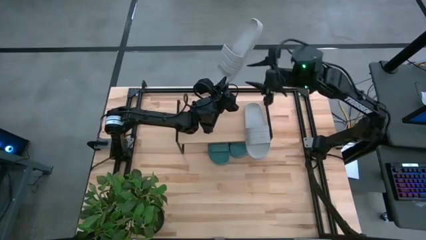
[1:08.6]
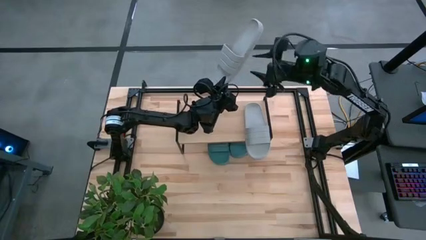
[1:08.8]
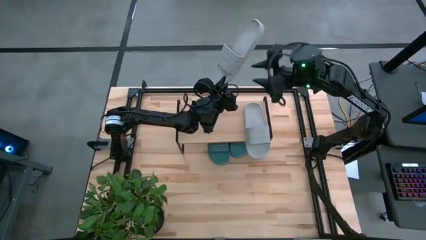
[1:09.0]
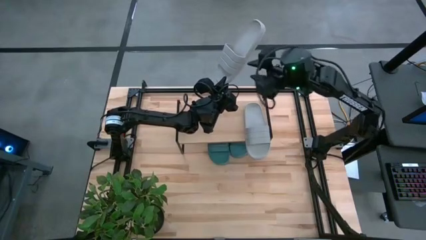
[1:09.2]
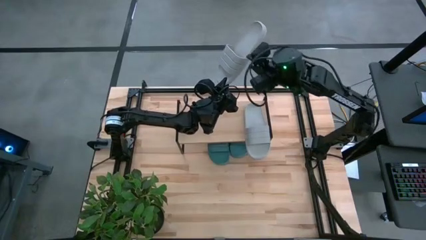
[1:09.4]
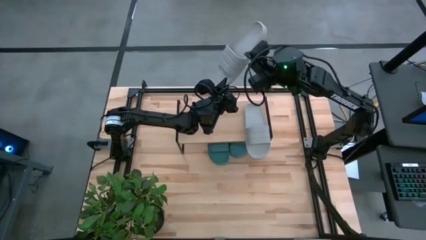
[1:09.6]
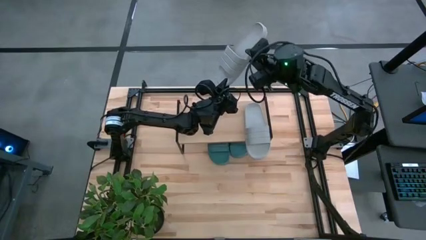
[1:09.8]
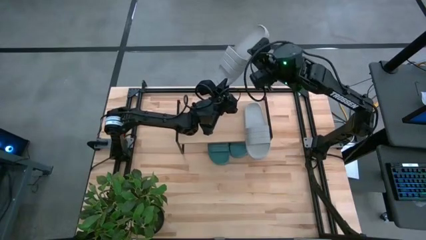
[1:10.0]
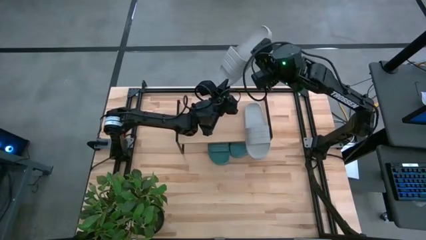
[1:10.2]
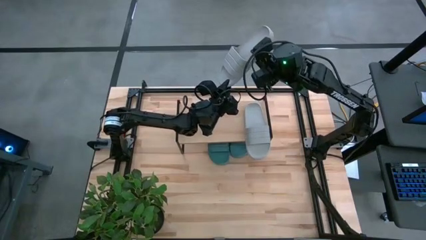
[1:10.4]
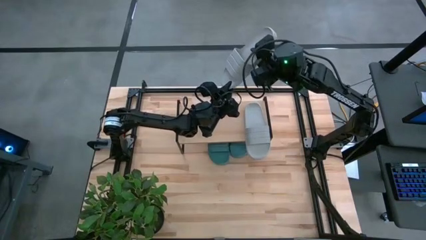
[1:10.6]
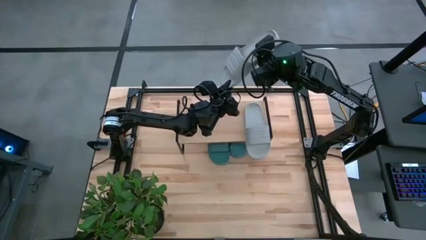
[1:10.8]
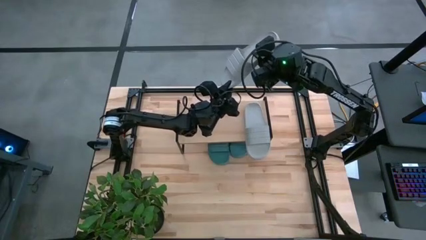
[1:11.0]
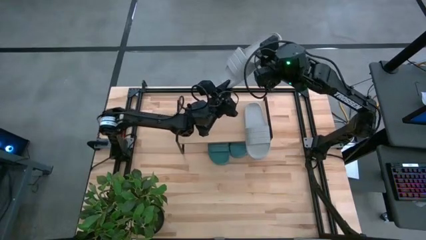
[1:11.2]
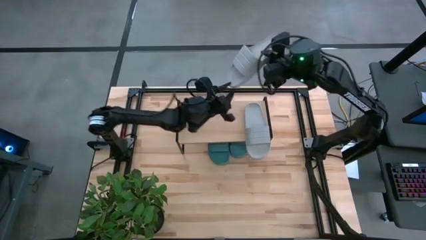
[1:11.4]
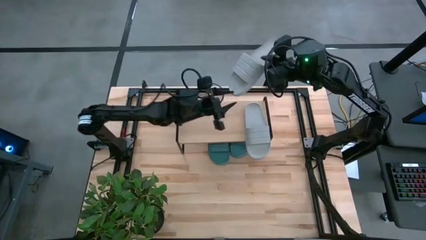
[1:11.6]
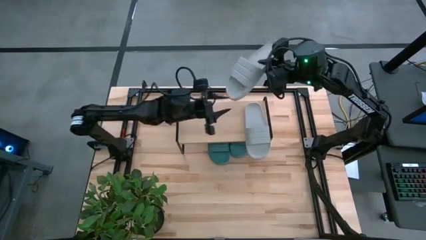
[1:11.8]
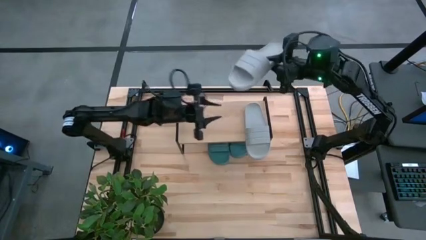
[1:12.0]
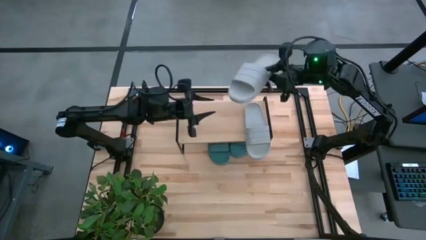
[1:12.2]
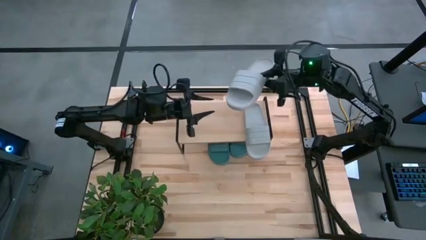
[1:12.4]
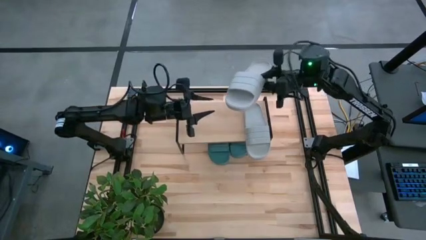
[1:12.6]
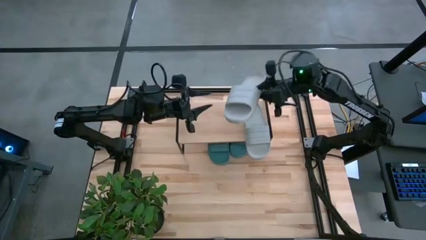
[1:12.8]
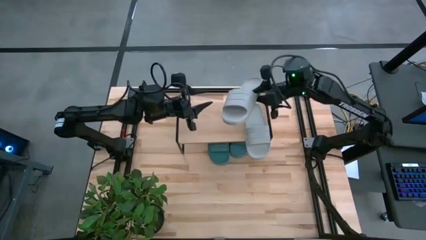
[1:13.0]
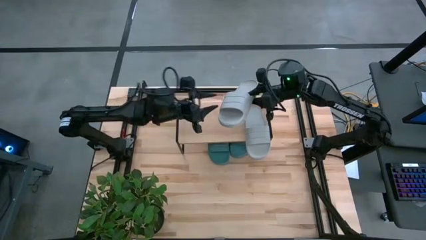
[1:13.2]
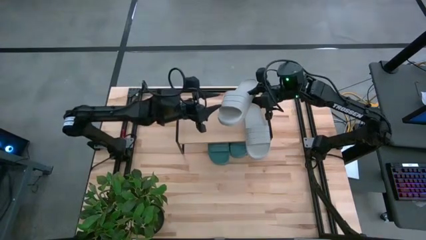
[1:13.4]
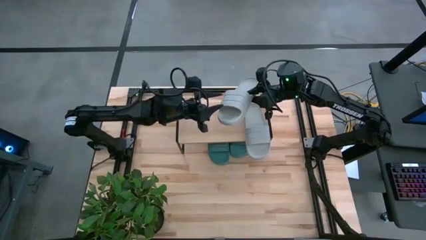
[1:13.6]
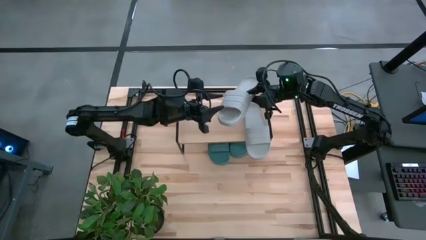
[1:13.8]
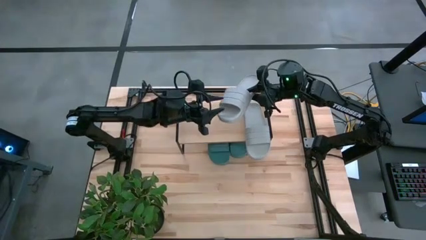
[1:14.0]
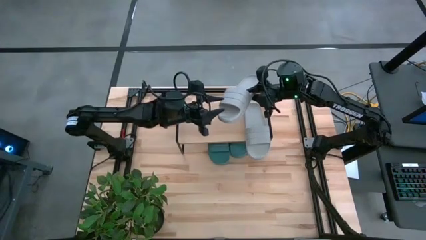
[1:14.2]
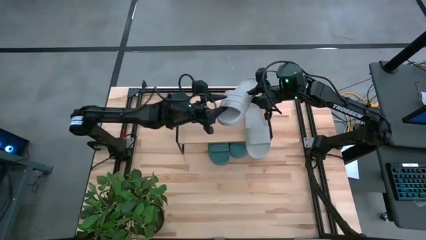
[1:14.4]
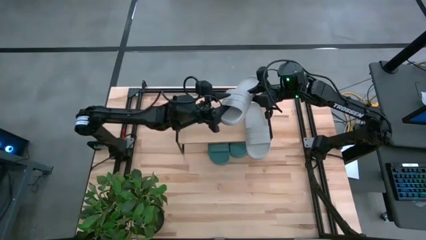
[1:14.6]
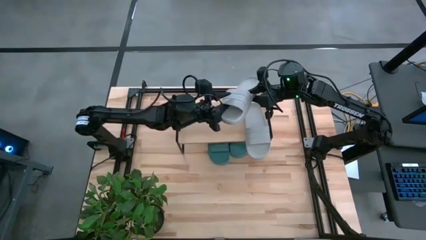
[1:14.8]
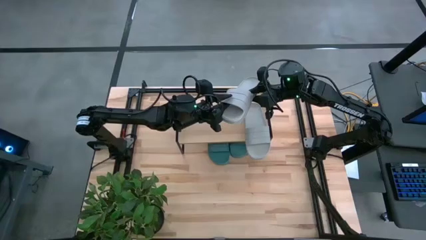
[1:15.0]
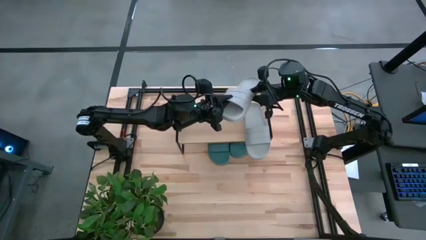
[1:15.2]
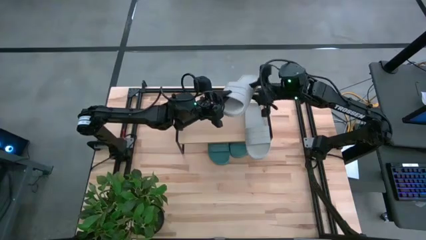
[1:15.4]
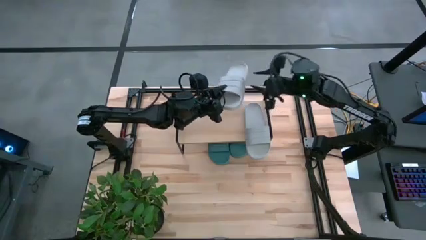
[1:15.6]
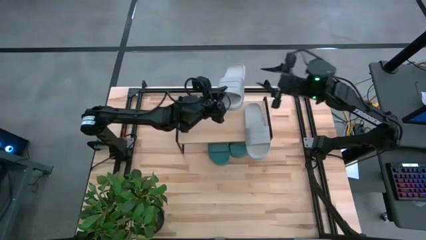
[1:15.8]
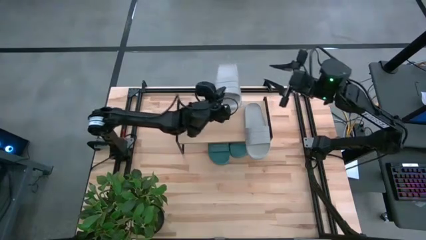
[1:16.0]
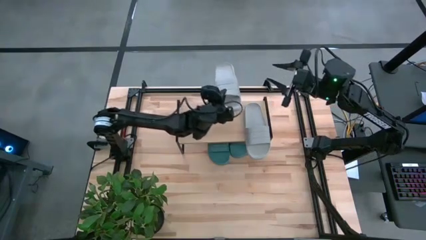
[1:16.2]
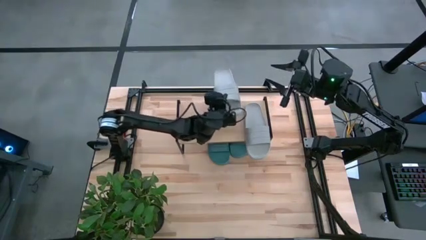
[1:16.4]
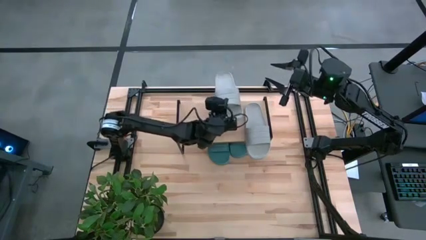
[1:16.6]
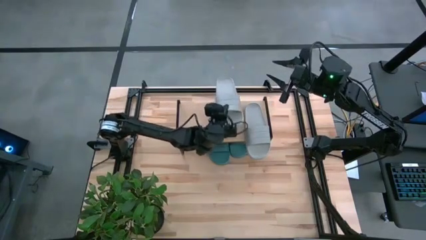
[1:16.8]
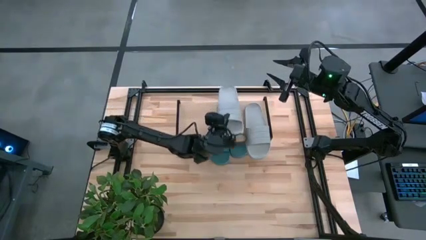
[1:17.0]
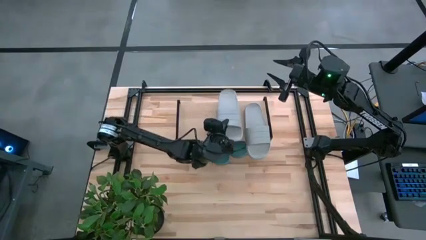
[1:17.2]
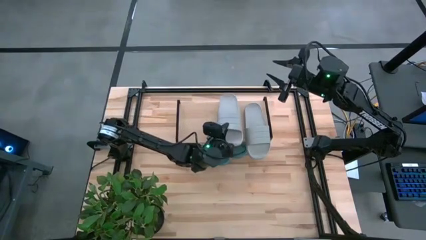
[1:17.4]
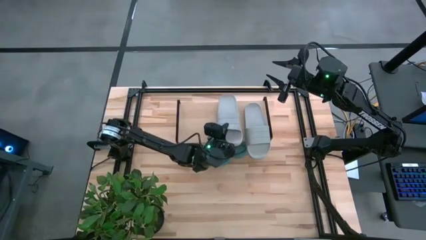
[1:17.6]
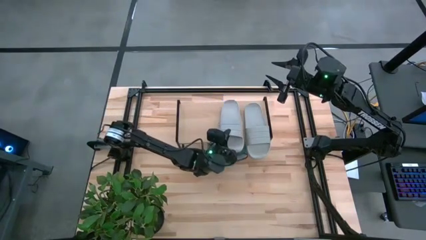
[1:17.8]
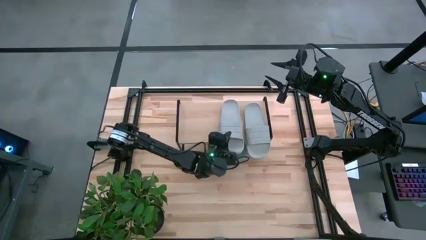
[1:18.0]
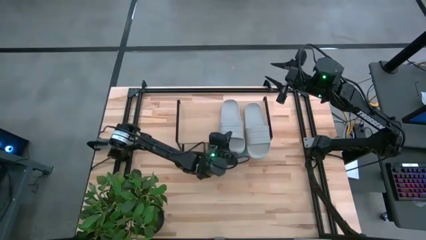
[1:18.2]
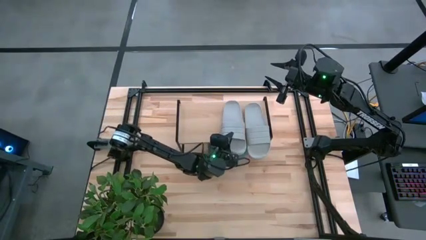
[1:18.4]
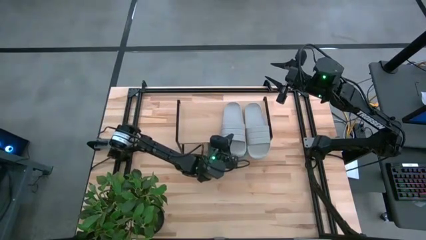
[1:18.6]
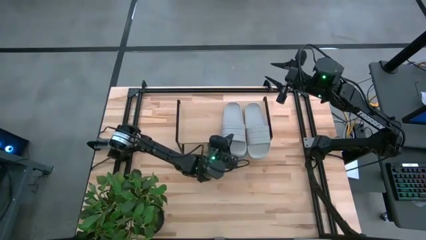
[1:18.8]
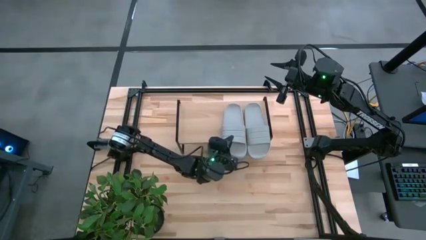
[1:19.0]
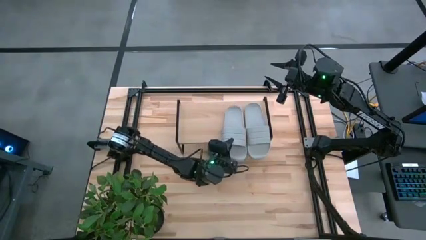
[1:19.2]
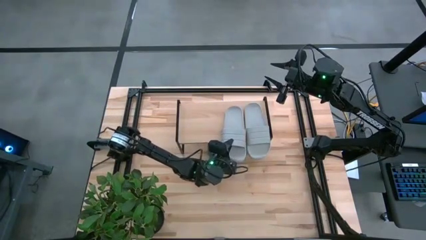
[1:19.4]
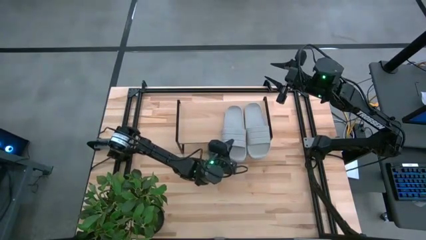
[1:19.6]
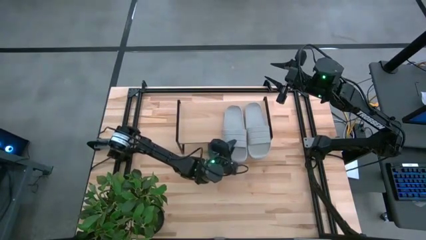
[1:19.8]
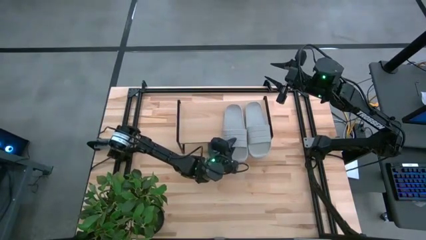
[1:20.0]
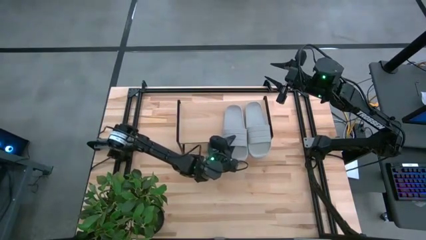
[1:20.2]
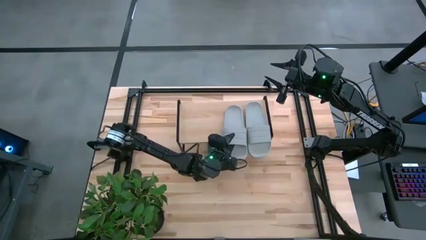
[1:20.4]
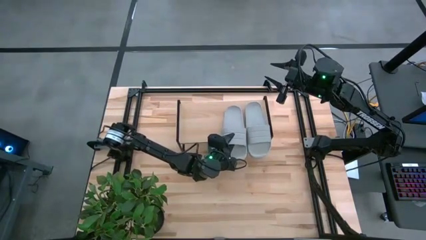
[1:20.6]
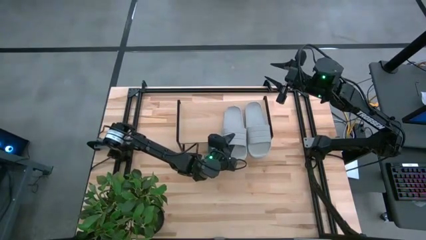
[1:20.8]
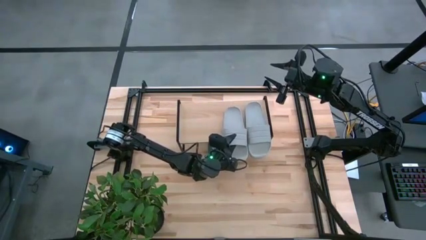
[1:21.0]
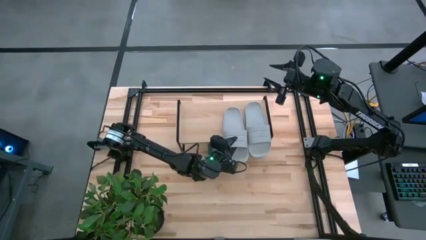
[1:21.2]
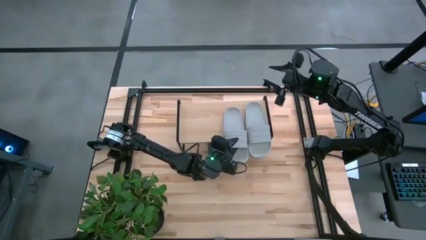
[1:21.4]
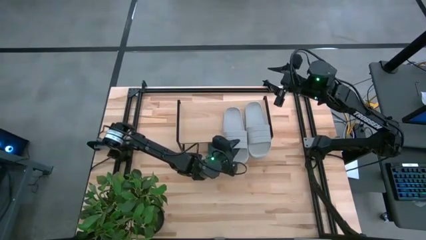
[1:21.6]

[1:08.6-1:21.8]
Task: Pick and place slides into the shelf
Put the gray slides on the shelf

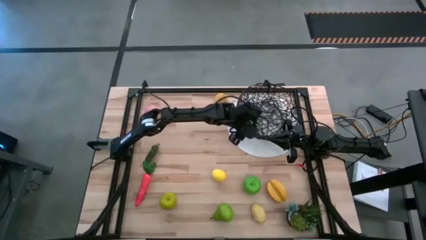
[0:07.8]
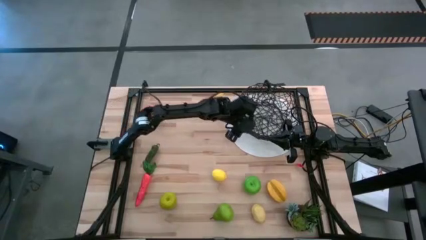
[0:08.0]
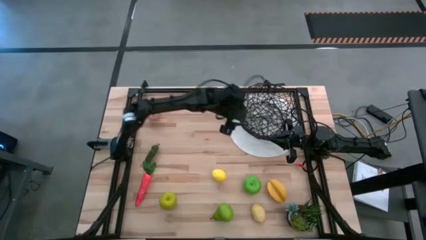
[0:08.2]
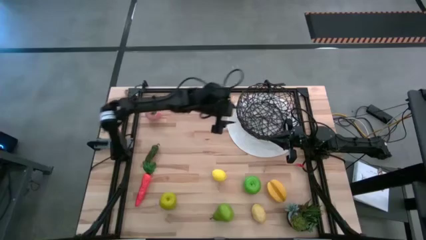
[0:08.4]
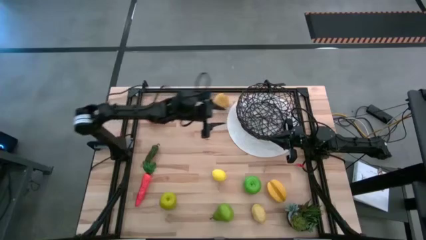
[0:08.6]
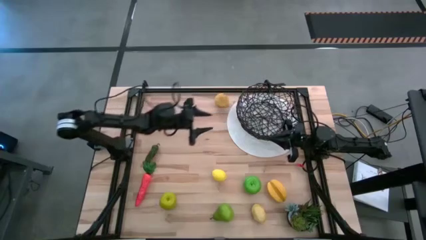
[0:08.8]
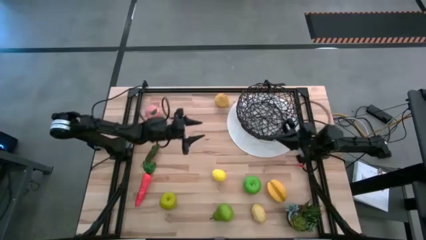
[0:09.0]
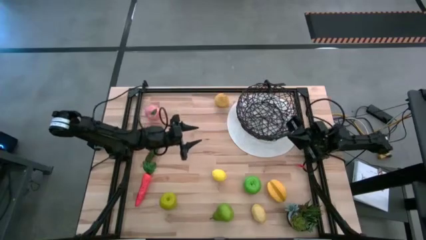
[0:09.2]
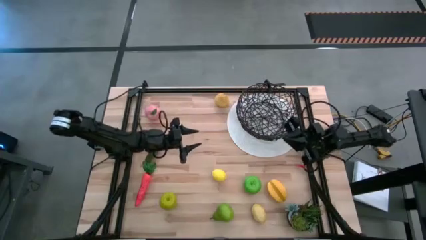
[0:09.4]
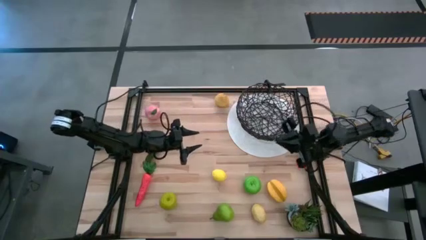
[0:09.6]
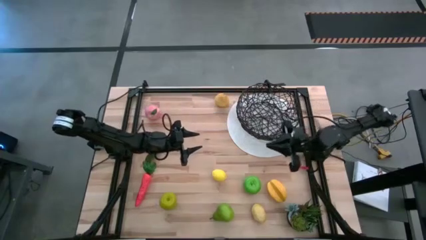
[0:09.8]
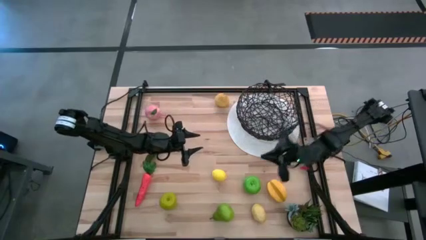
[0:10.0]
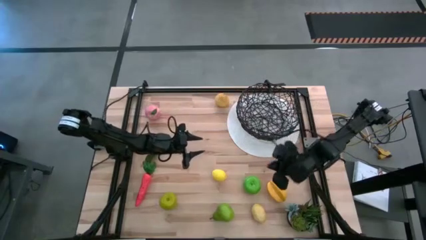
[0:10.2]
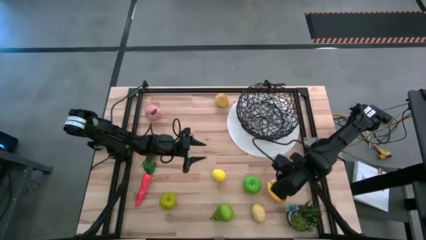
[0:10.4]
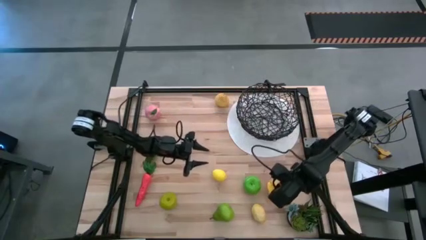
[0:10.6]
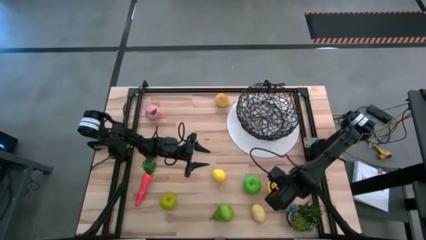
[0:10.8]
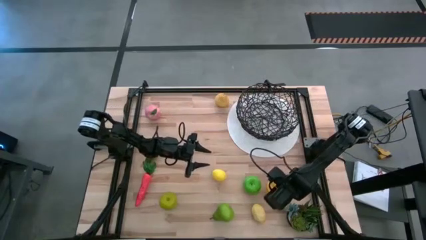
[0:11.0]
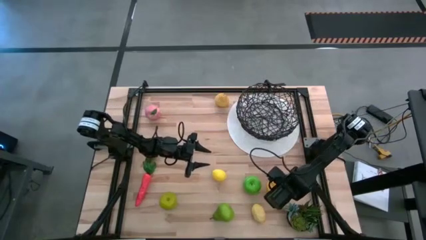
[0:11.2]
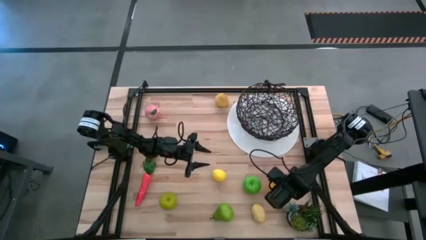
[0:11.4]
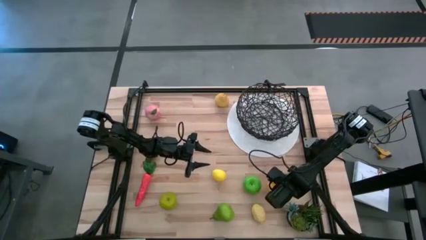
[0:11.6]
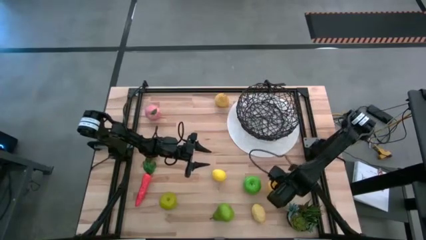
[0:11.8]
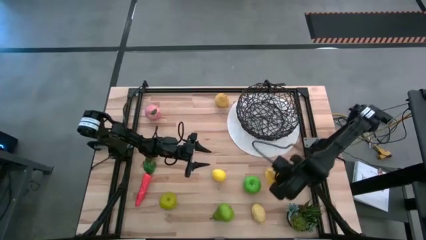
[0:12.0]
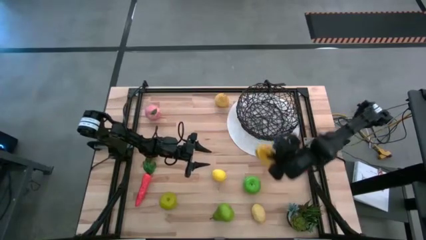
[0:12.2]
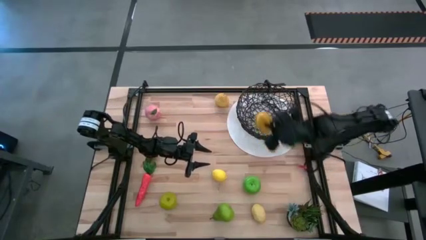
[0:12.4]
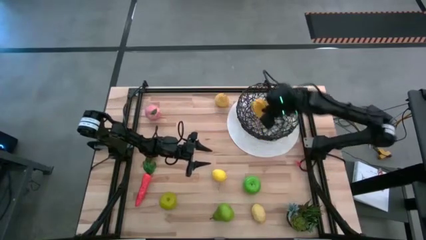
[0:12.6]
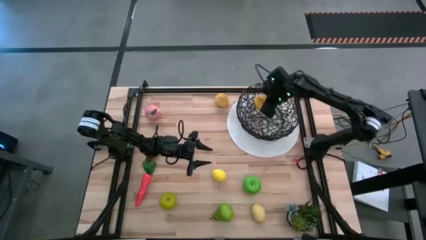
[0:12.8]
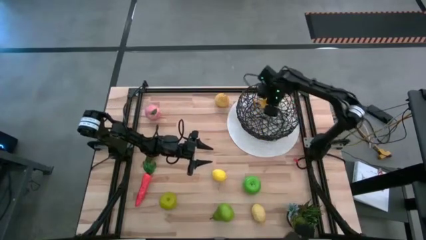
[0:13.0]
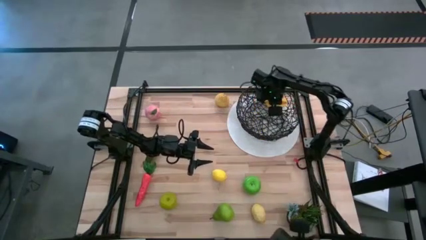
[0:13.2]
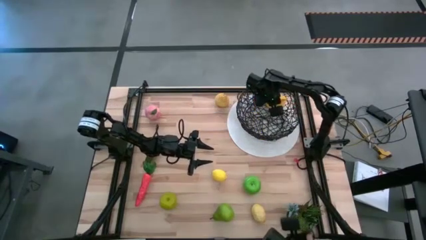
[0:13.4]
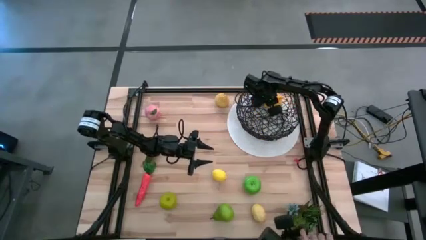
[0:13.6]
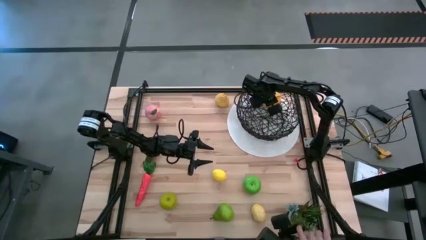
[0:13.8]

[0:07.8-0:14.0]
Task: Build produce basket
Put the yellow start fruit into the black wire basket
